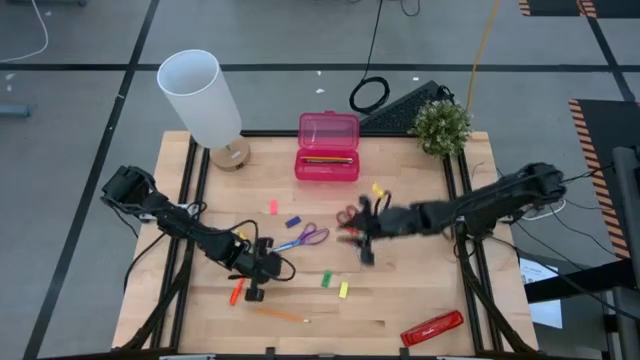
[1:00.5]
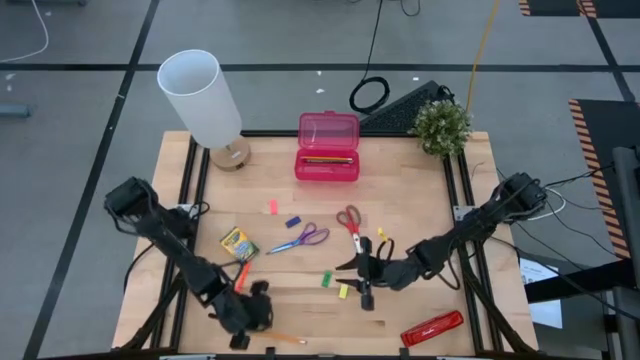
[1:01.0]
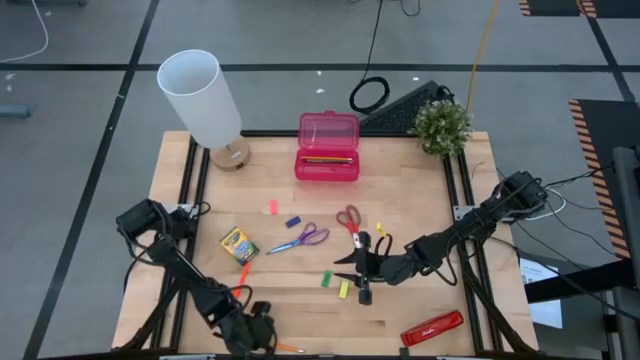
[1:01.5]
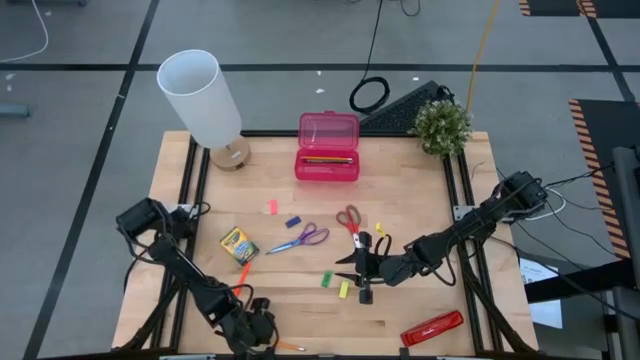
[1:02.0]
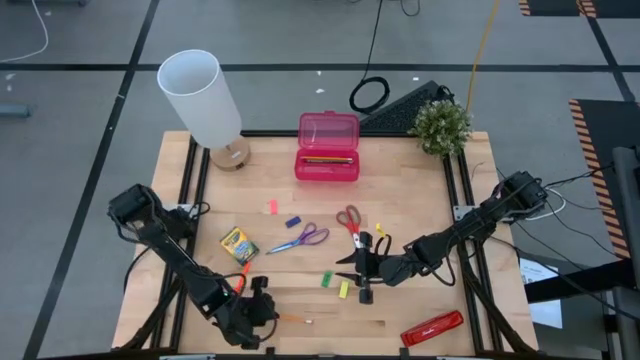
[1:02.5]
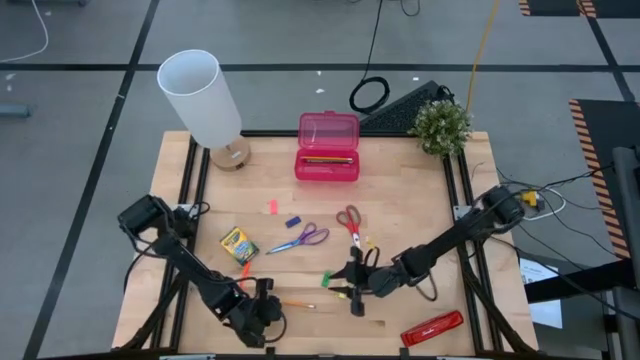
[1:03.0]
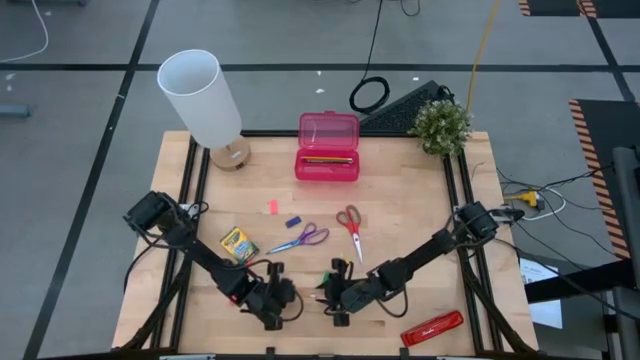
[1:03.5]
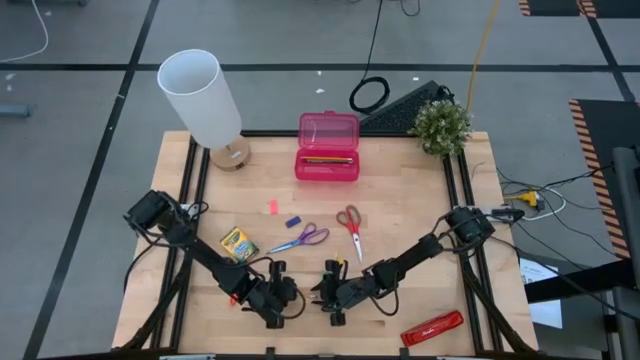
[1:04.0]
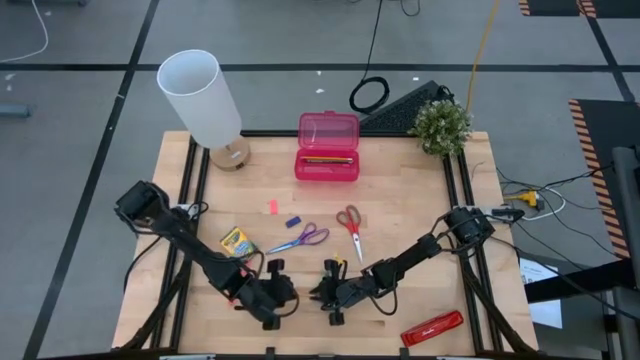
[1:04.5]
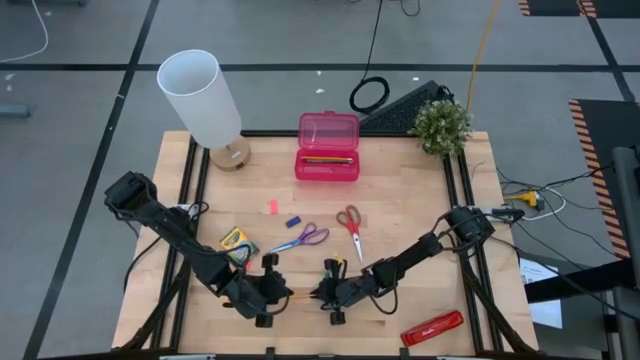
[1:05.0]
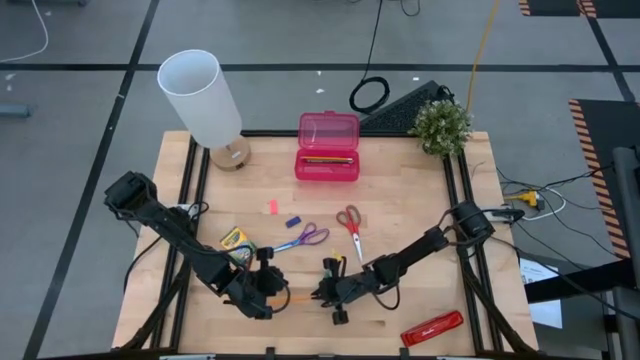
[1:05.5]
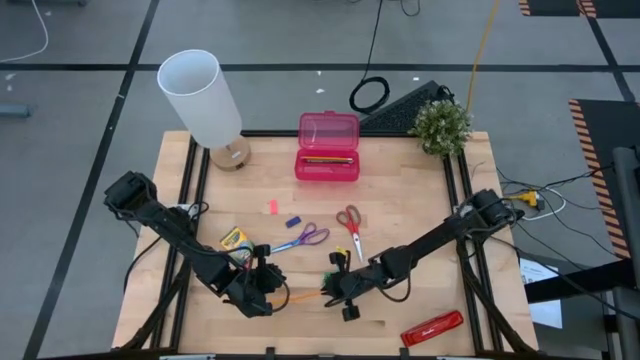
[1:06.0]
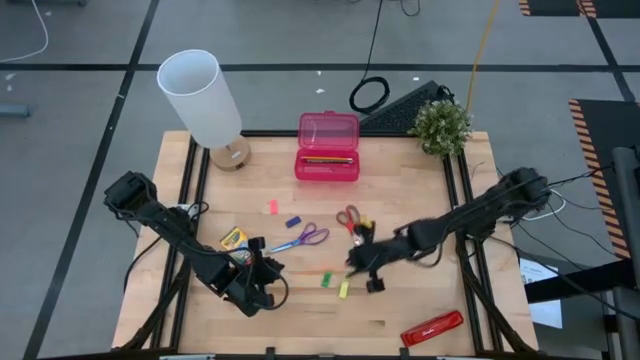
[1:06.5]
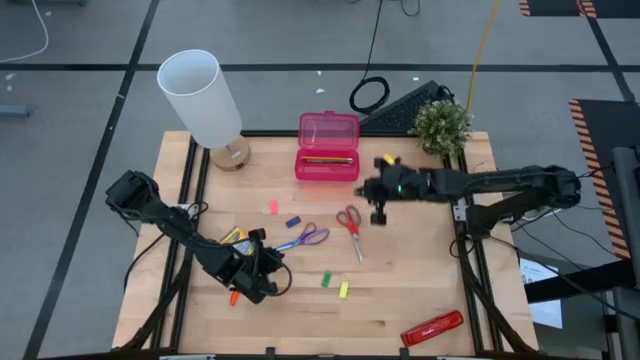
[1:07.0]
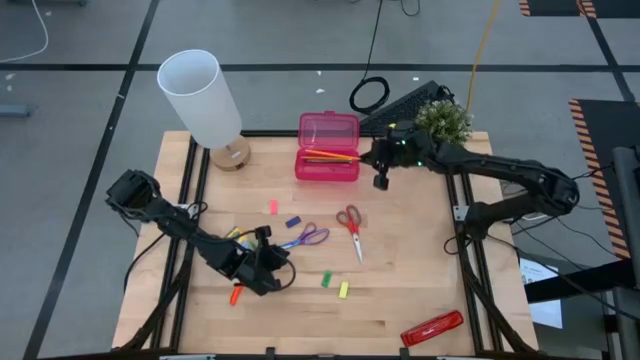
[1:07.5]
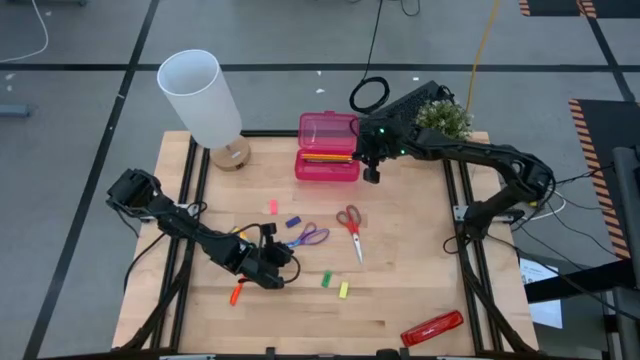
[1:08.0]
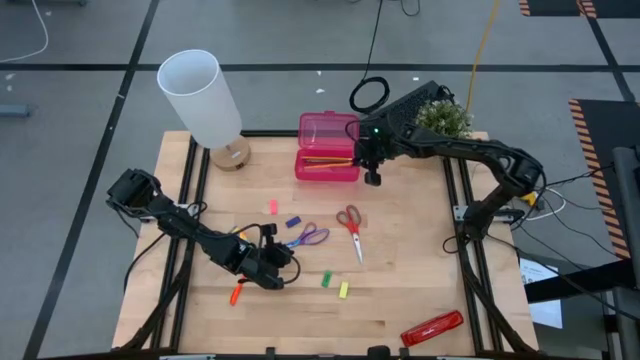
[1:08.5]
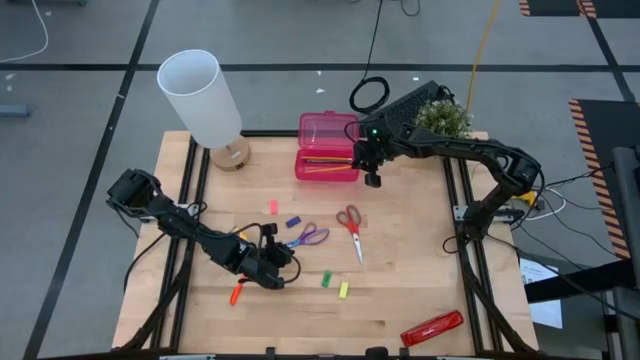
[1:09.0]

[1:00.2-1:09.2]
Task: Pack school essentials
Put the yellow pencil into the red supply box

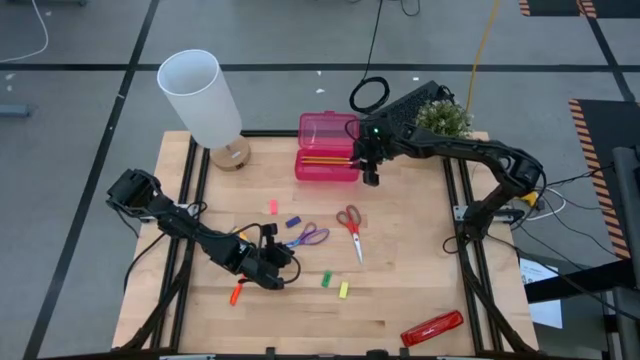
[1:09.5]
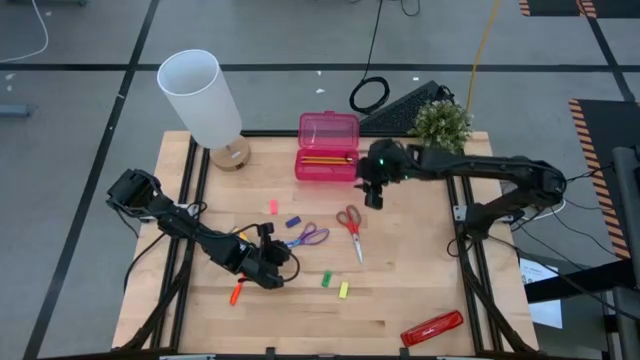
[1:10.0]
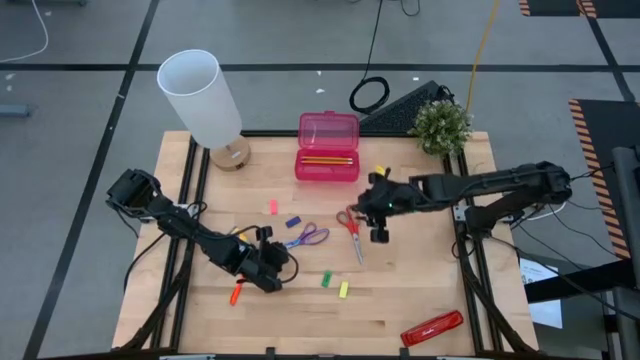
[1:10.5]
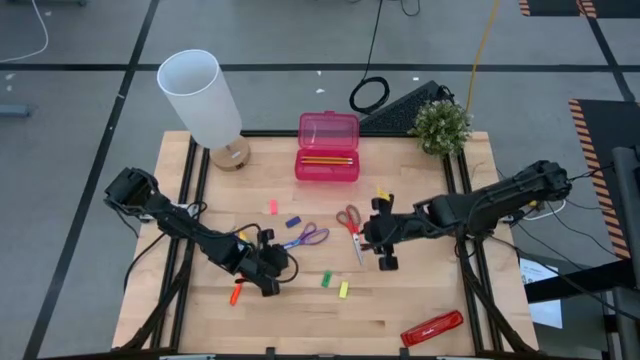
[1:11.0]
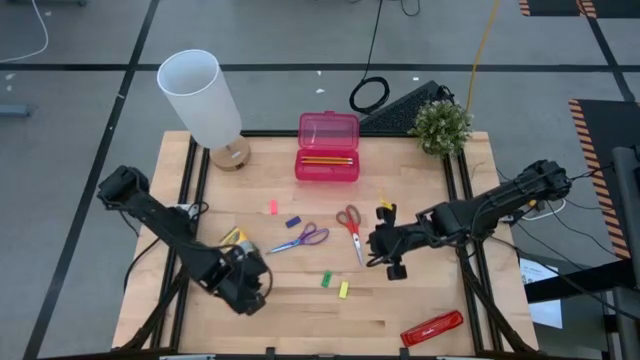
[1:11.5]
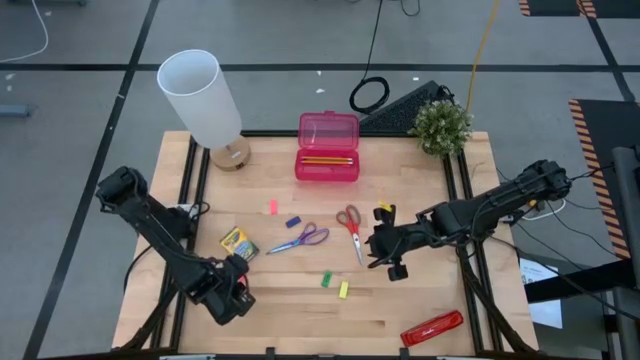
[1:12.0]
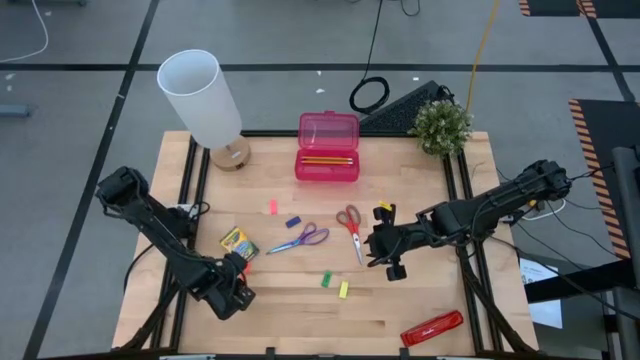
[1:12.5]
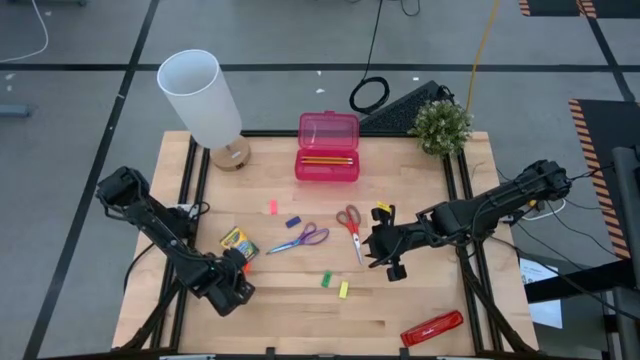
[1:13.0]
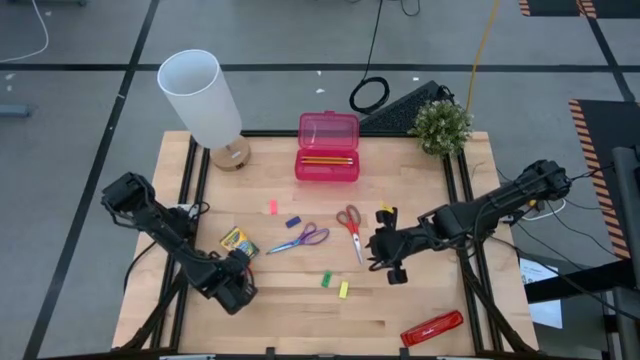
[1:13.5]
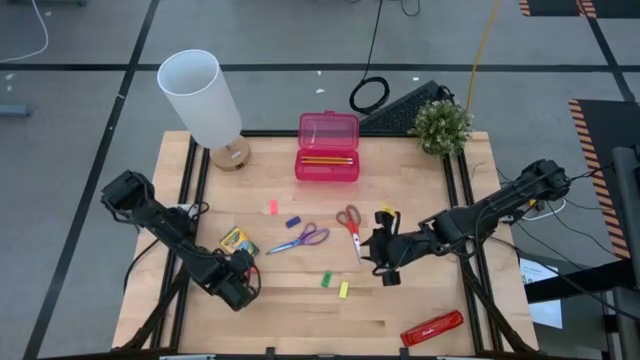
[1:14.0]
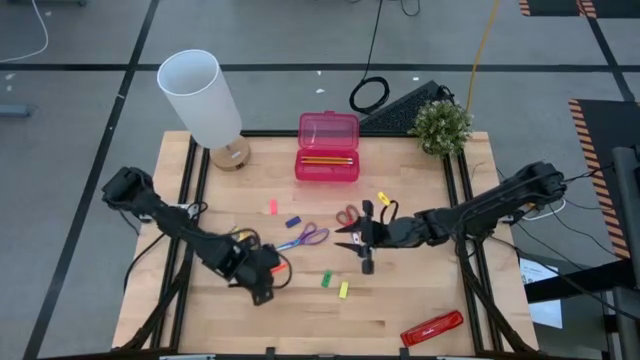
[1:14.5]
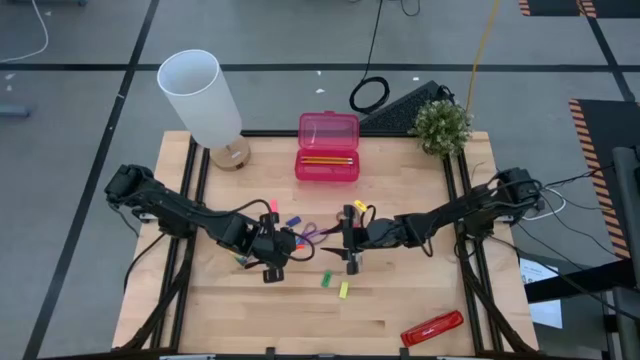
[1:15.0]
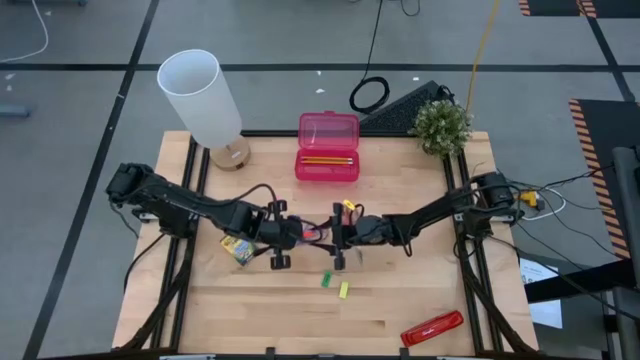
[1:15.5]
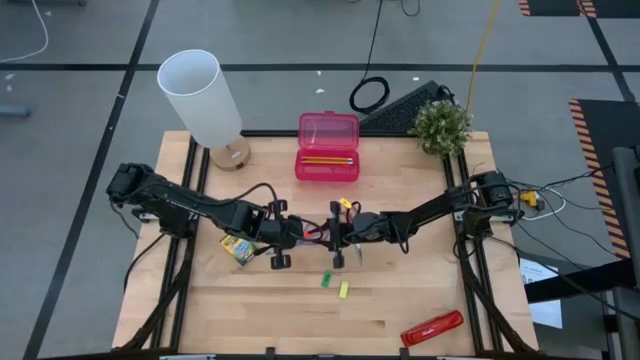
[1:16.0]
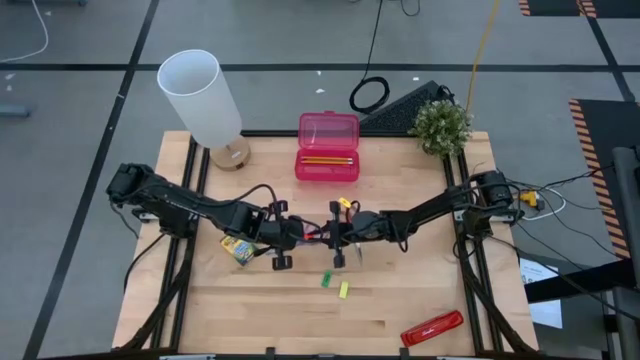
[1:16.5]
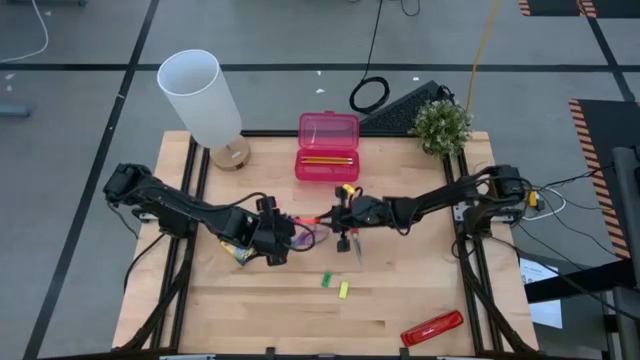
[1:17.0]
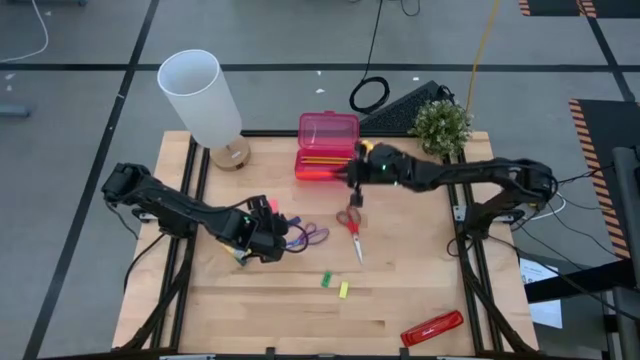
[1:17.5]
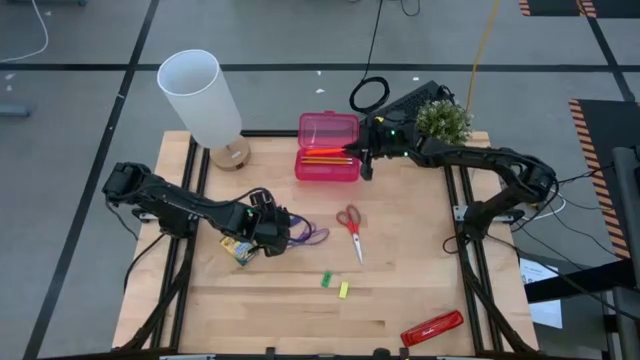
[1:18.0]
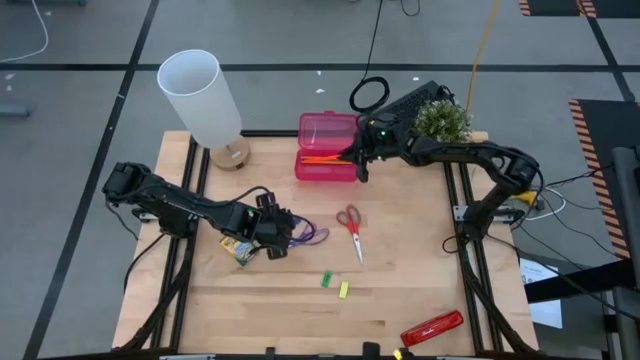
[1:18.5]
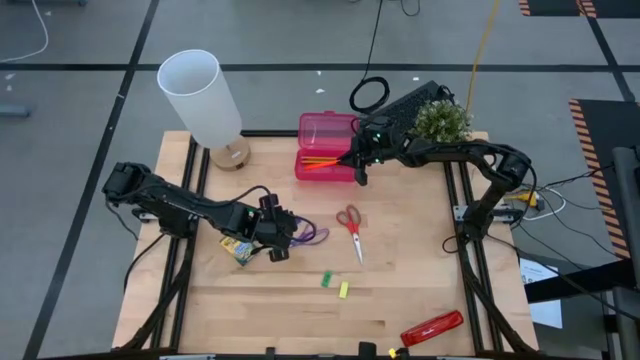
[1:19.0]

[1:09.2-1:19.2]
Put the orange pen into the red supply box
